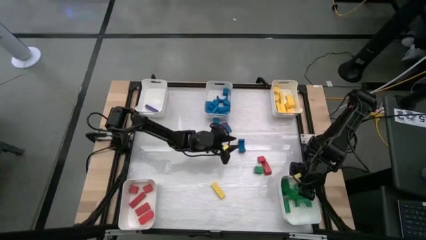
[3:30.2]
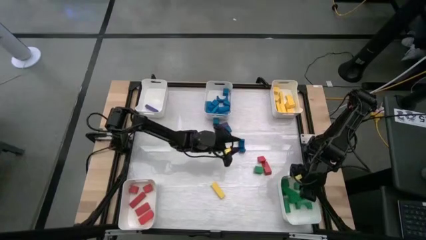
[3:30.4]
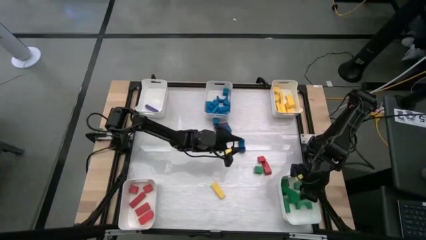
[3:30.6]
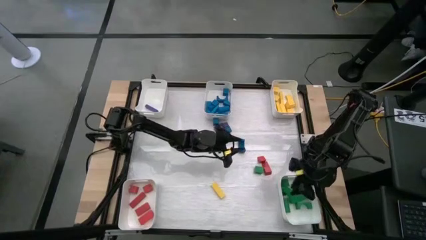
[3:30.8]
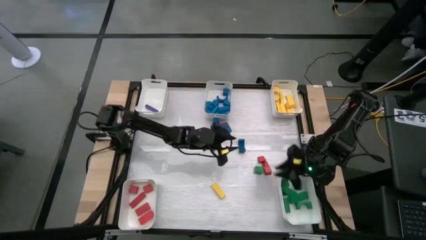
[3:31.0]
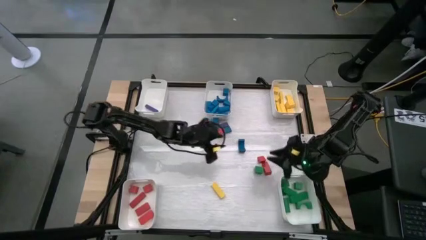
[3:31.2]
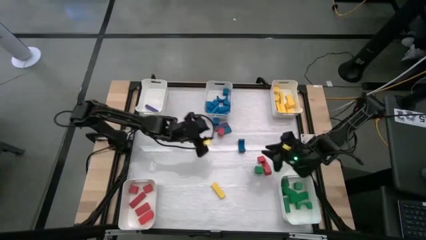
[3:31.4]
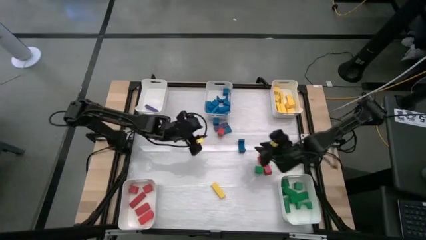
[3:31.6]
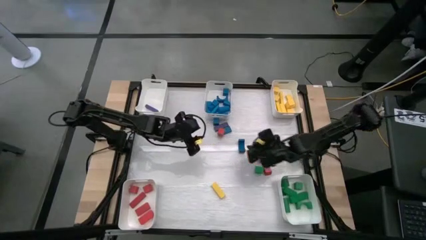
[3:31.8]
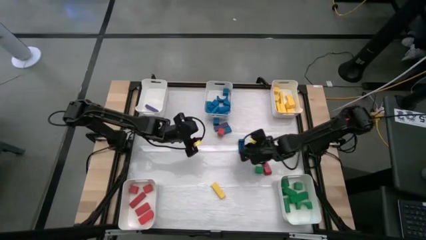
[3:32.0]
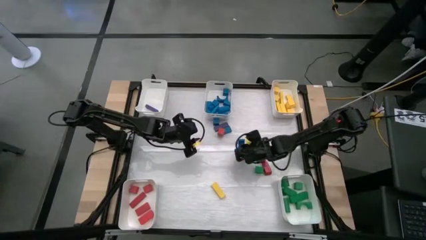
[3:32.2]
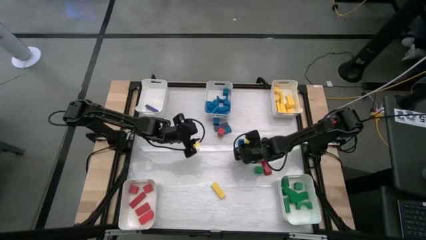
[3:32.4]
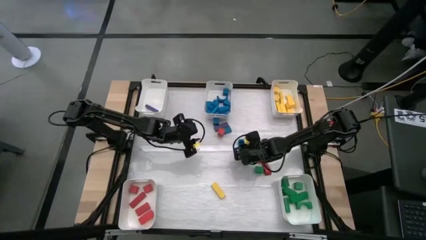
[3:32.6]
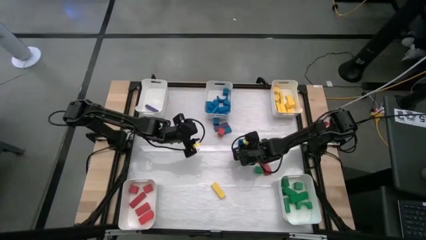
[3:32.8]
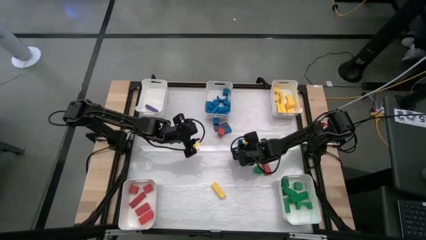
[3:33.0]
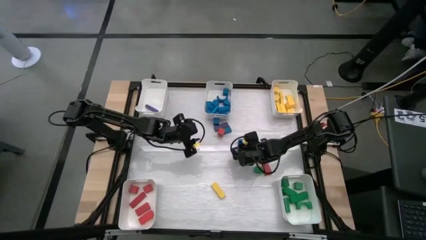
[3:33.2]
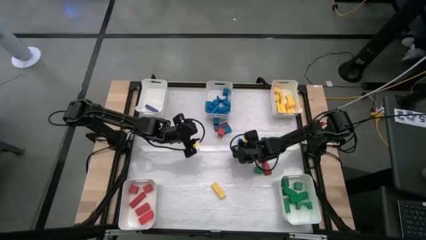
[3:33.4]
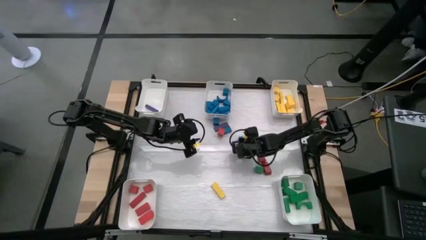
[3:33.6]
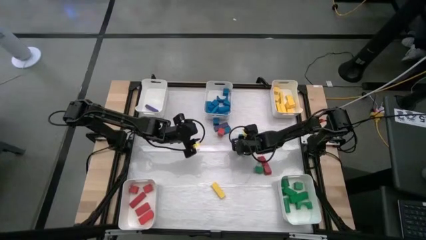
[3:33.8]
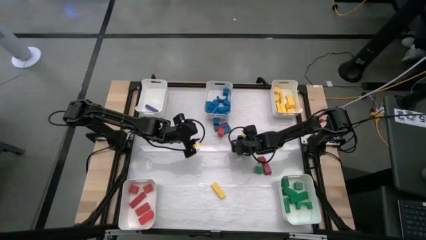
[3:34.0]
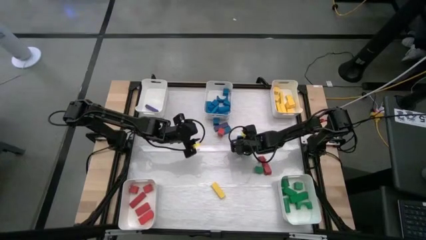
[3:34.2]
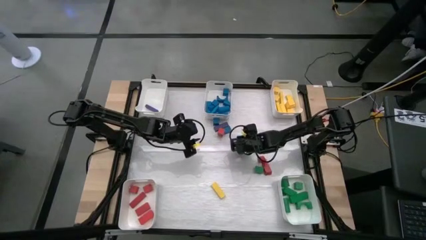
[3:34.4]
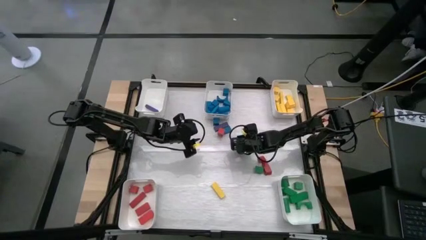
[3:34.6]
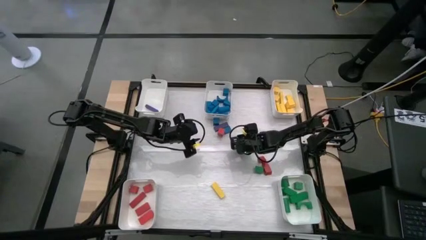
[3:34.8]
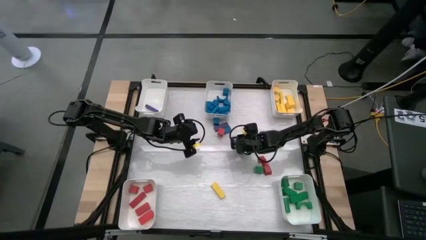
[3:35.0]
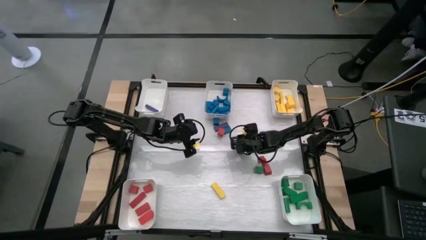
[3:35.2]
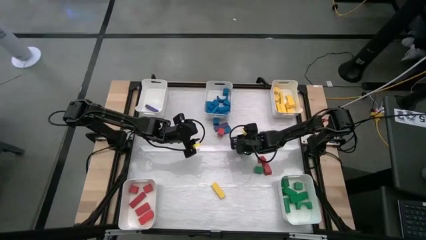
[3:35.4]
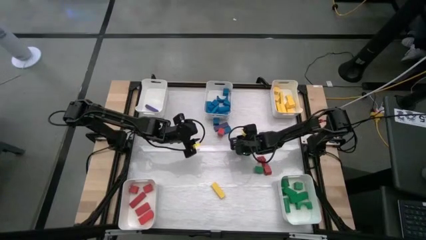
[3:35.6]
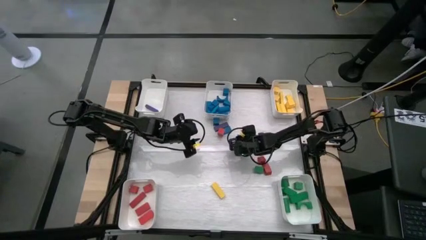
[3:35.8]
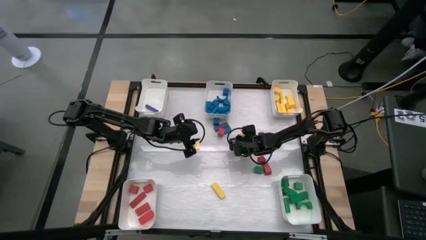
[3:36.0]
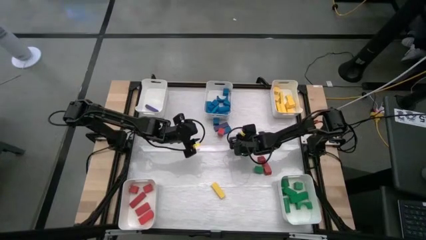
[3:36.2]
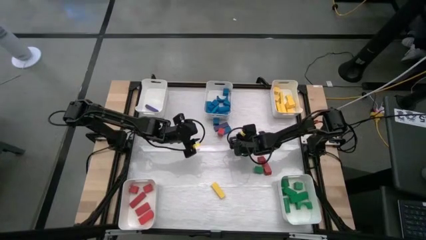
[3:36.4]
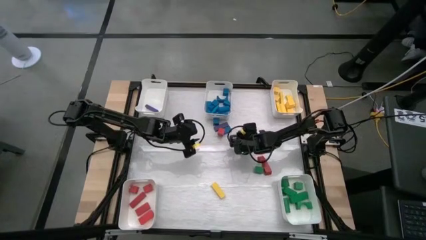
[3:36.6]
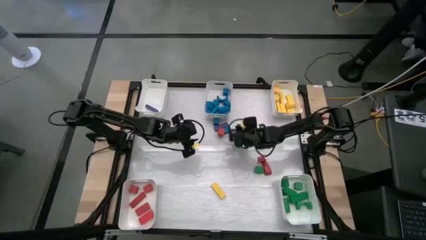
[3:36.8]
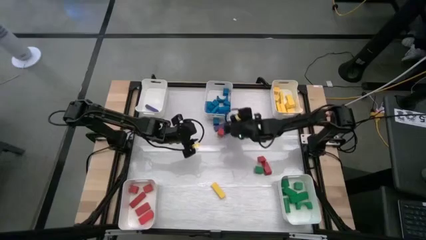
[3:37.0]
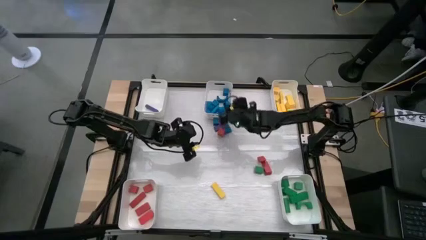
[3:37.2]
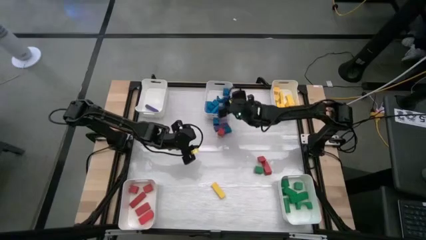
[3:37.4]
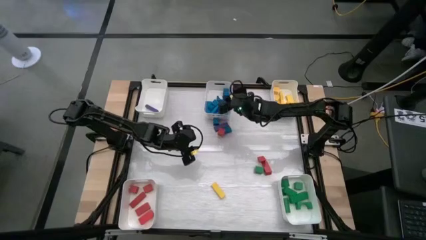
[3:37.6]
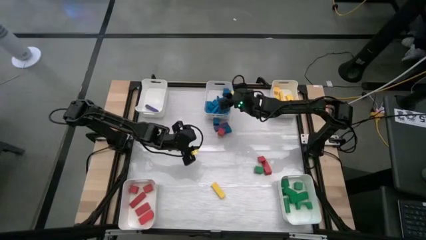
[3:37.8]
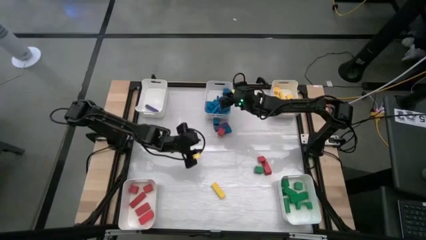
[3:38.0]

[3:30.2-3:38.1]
Task: Sort blocks
Put the blue block into the top center white bin

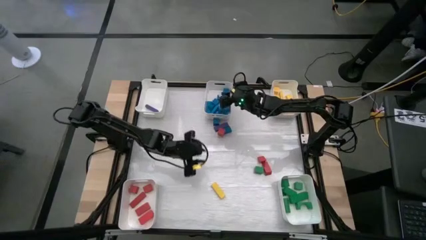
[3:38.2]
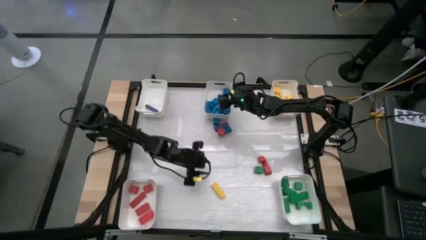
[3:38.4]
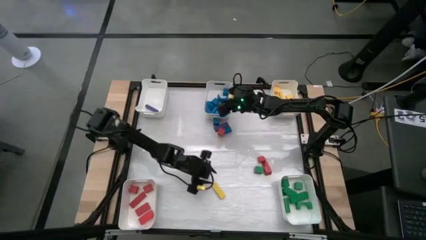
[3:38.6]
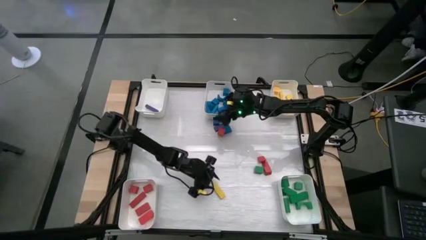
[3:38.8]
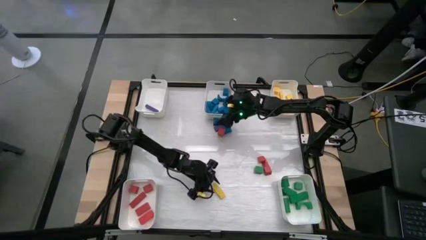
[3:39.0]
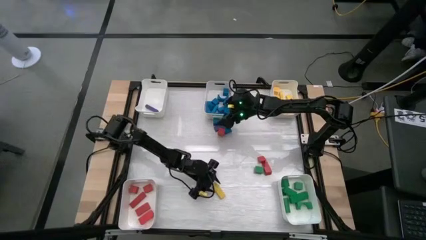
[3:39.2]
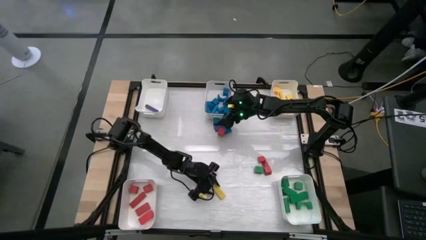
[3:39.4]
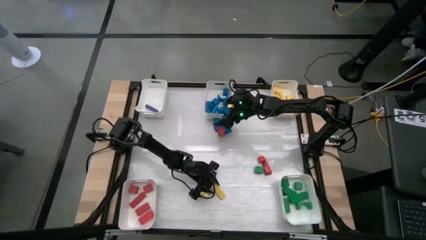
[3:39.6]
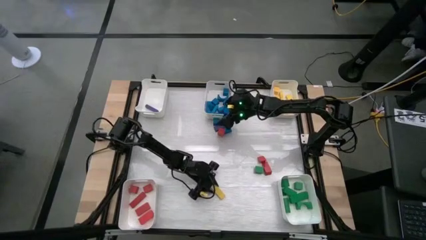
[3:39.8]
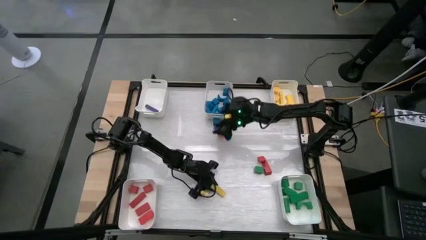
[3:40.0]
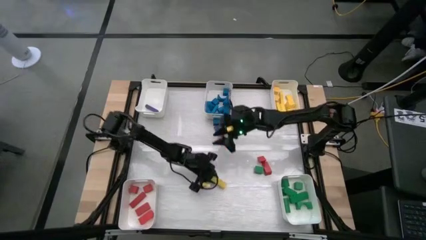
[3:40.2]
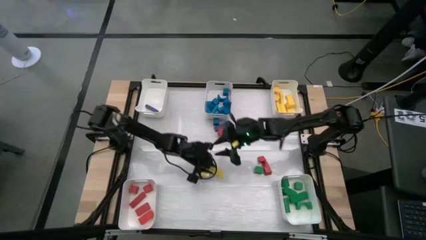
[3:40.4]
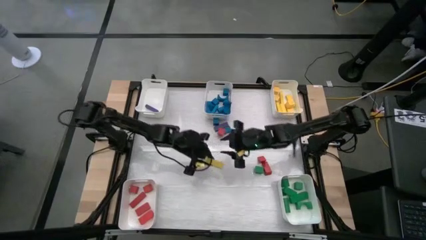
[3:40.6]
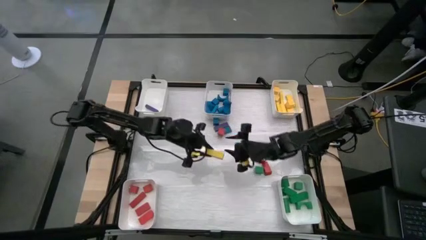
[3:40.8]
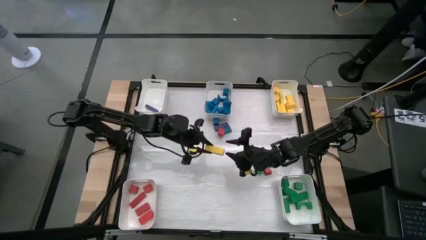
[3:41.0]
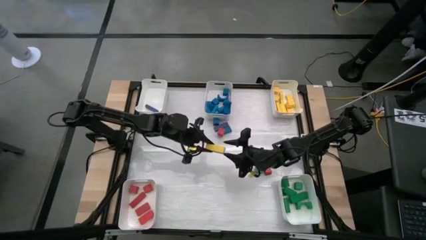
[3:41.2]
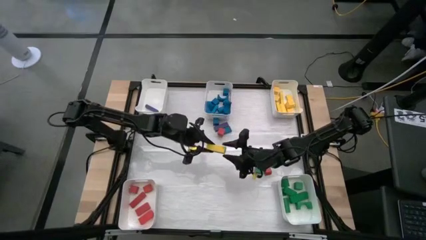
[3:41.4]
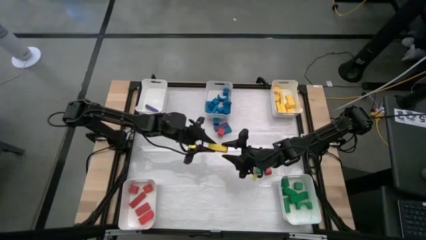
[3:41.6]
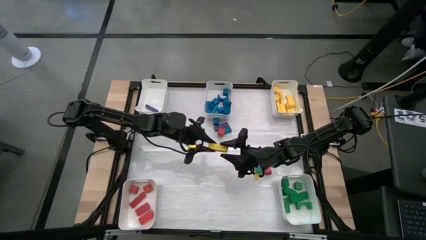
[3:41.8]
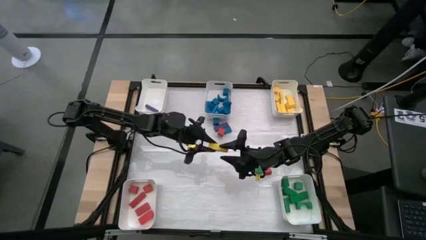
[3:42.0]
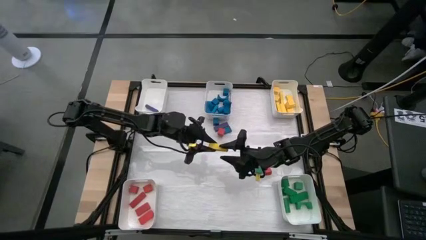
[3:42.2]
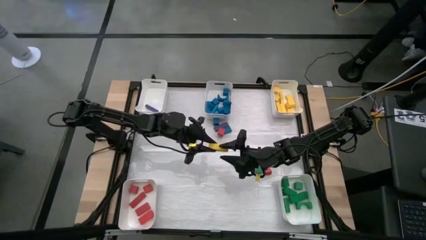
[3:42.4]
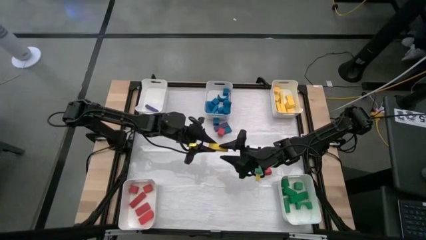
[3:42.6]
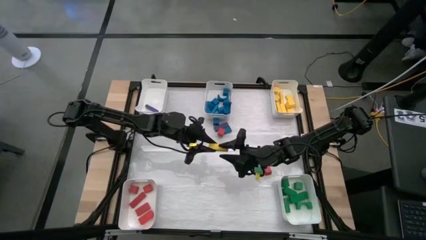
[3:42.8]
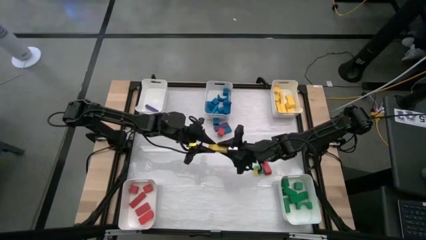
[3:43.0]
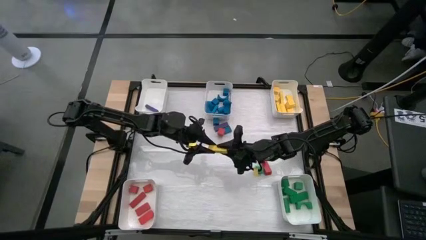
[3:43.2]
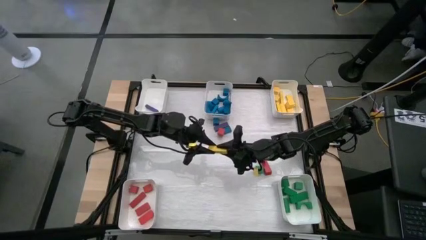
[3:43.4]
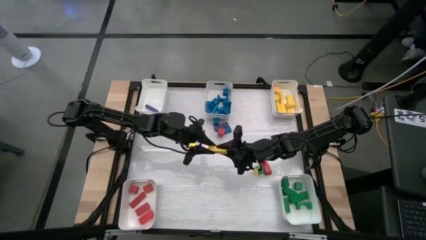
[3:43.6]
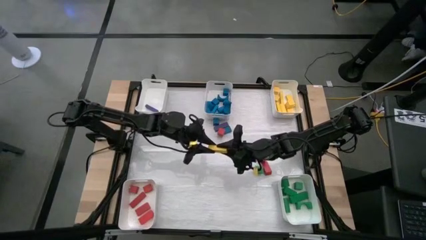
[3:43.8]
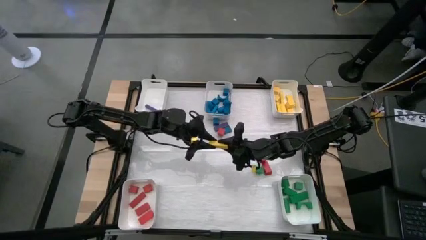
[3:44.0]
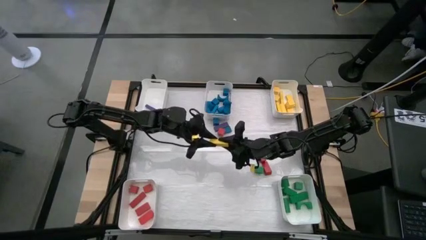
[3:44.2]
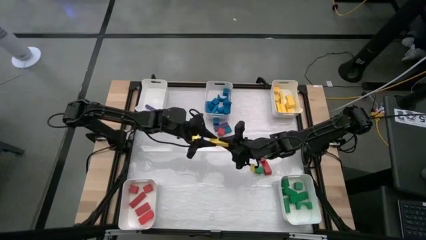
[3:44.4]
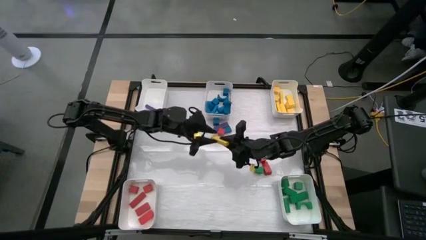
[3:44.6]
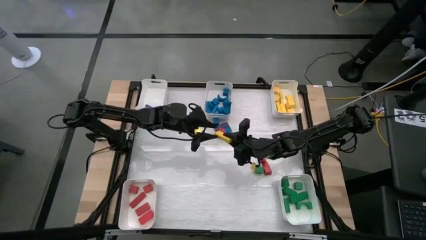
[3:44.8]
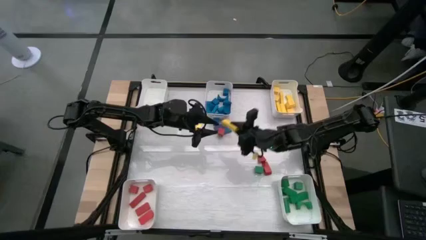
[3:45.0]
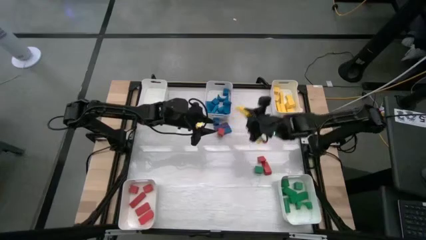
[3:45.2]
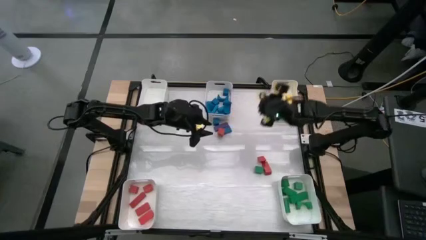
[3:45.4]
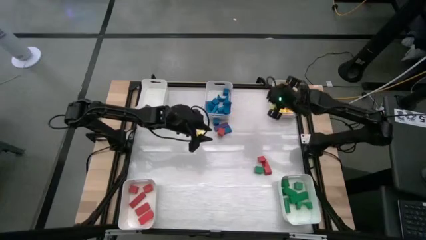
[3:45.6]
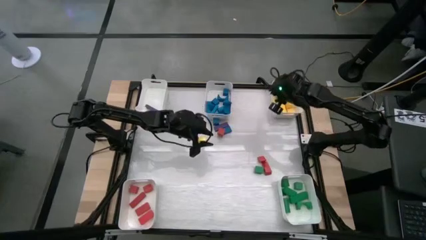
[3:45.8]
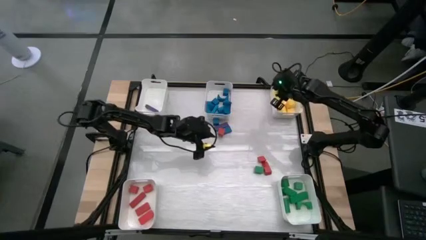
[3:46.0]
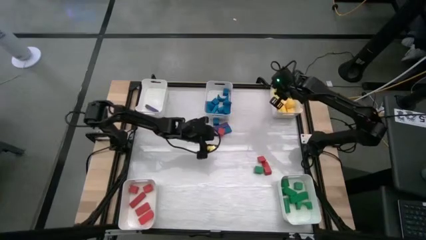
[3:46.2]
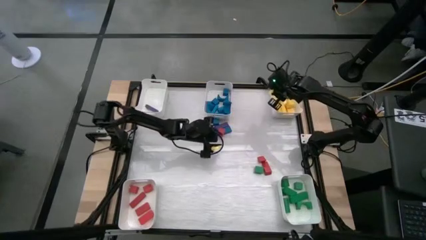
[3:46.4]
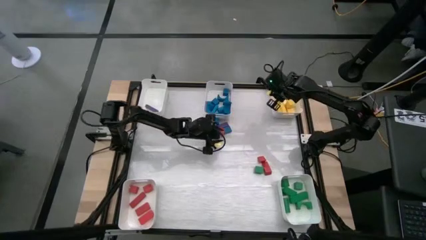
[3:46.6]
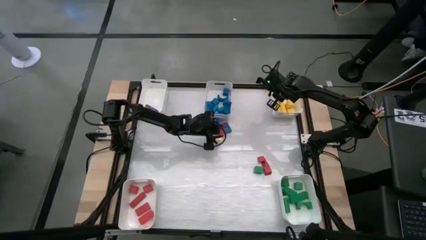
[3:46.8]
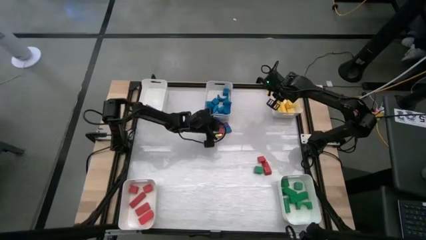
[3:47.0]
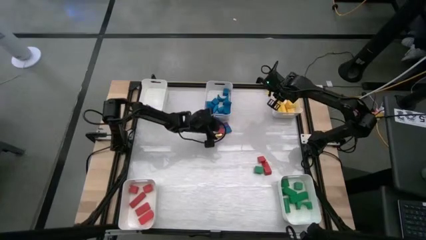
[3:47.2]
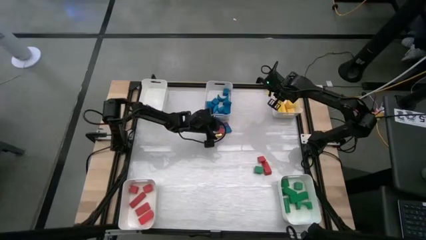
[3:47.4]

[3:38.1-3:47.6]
Put the yellow block into the top right white bin
